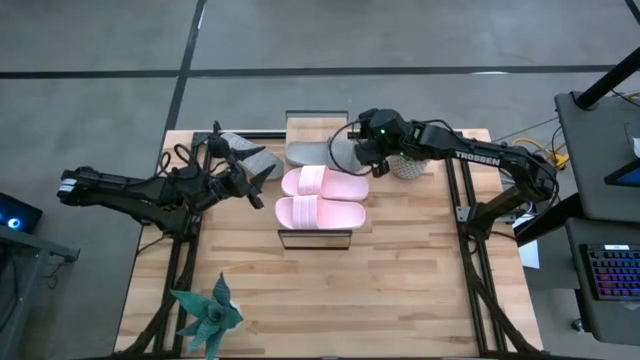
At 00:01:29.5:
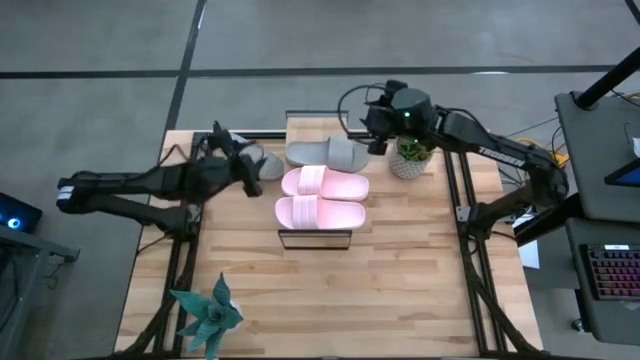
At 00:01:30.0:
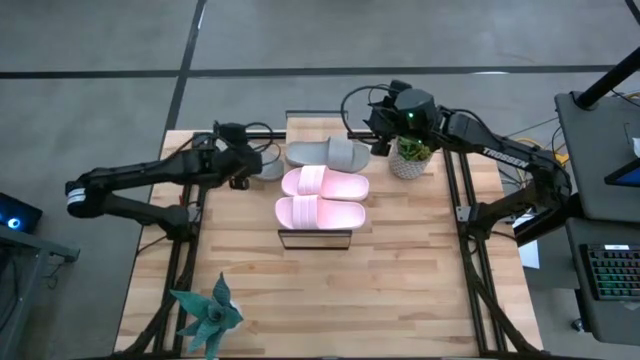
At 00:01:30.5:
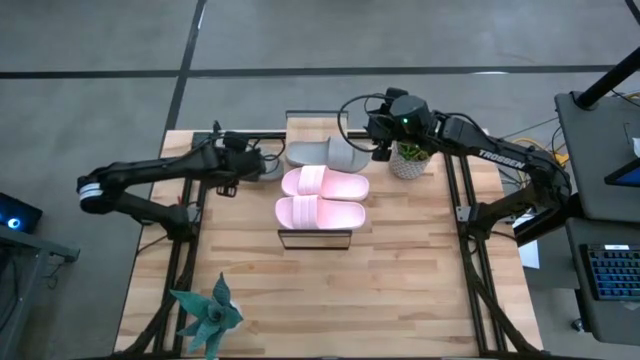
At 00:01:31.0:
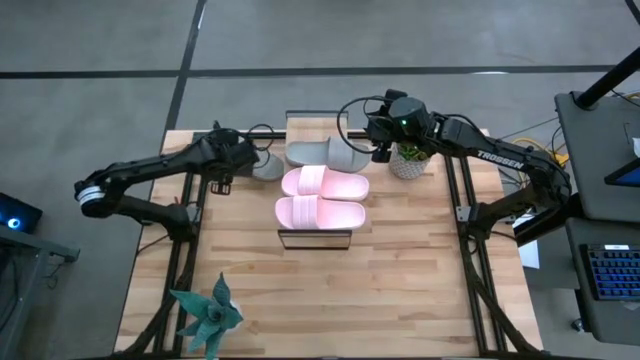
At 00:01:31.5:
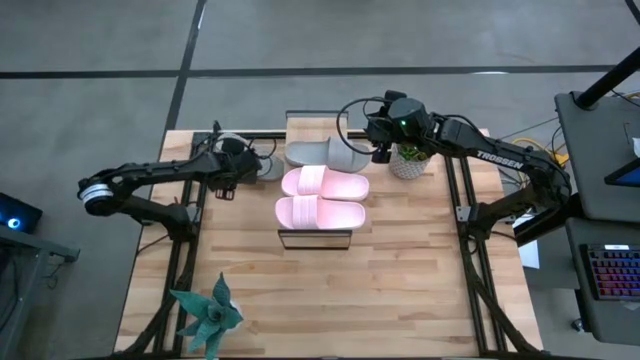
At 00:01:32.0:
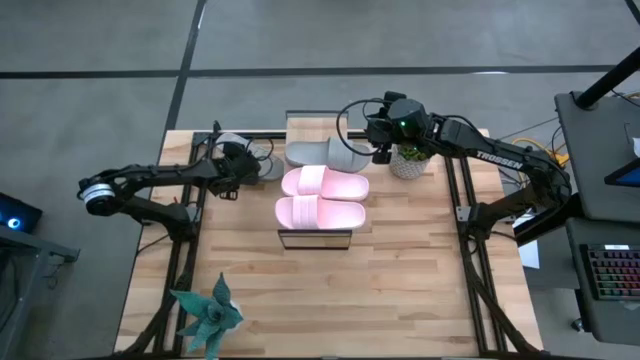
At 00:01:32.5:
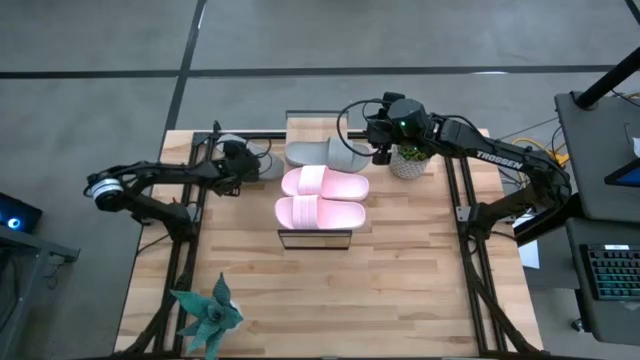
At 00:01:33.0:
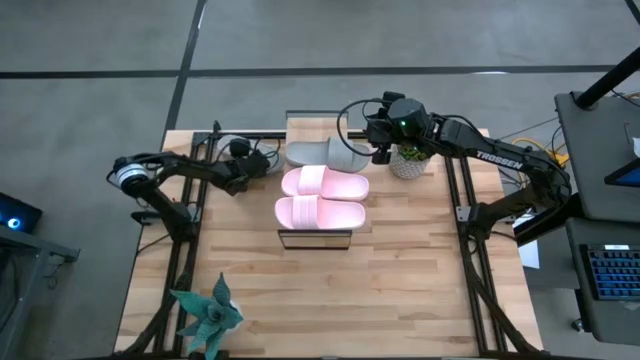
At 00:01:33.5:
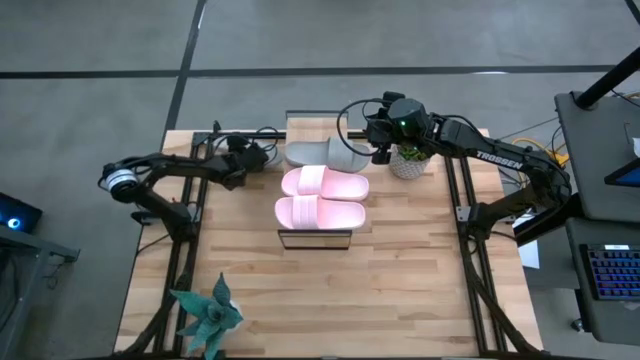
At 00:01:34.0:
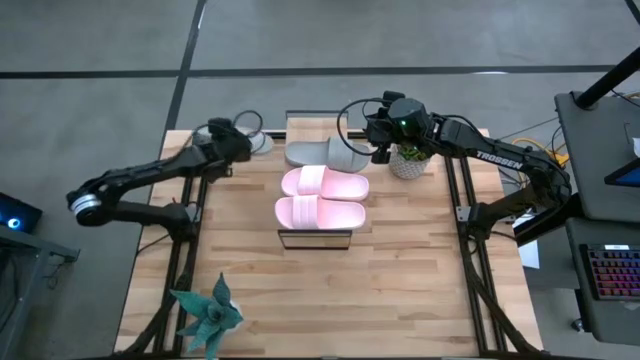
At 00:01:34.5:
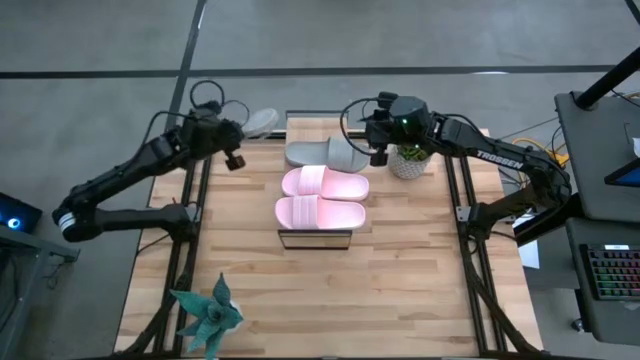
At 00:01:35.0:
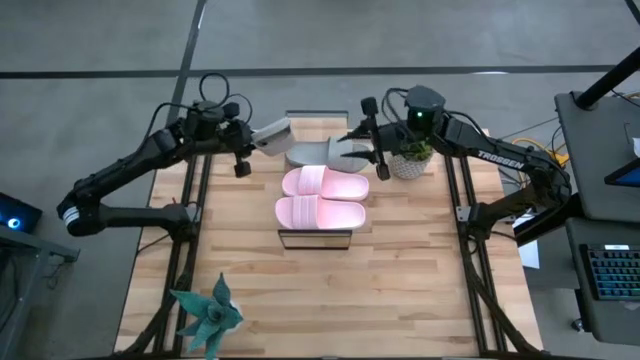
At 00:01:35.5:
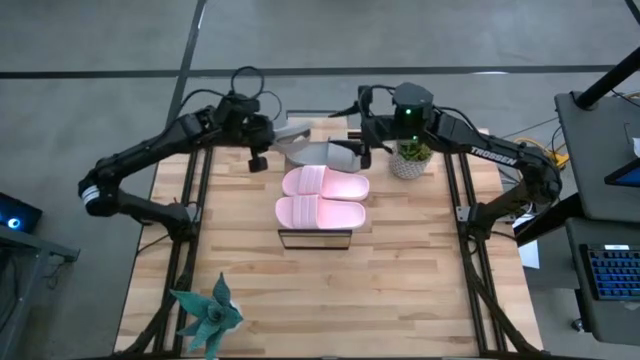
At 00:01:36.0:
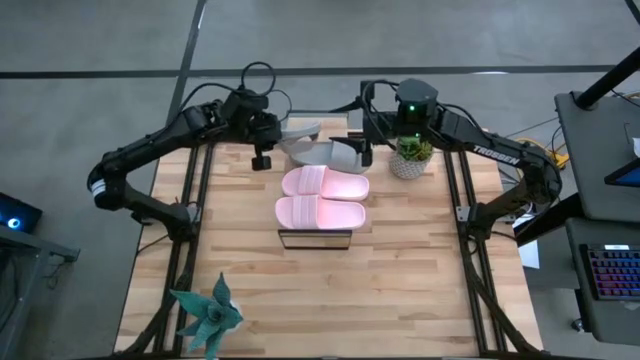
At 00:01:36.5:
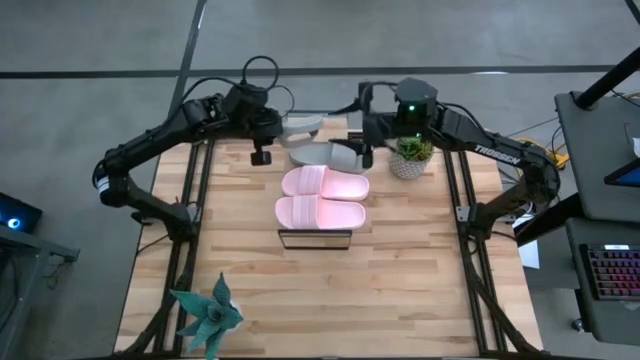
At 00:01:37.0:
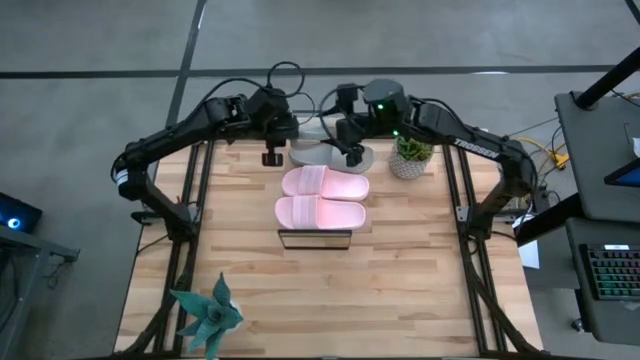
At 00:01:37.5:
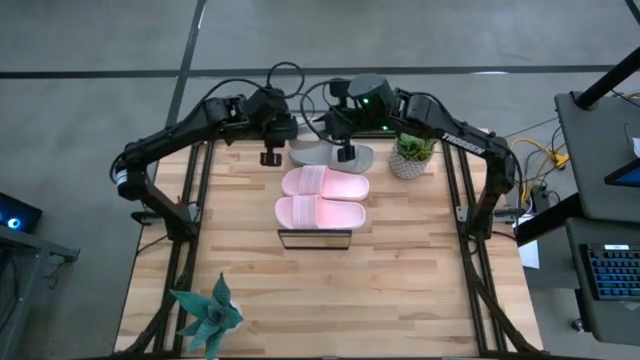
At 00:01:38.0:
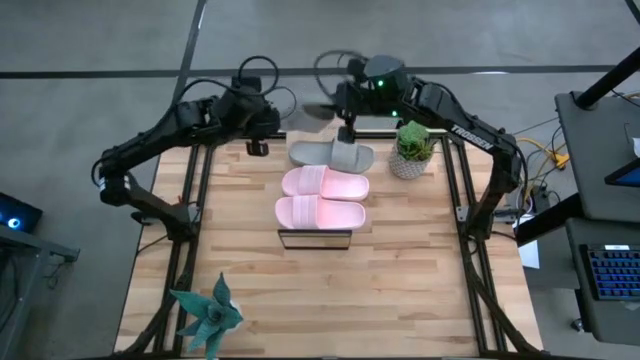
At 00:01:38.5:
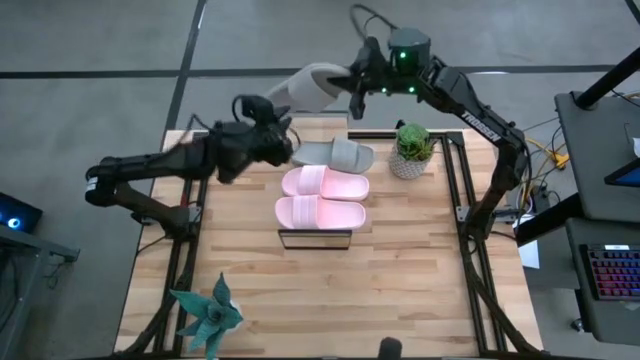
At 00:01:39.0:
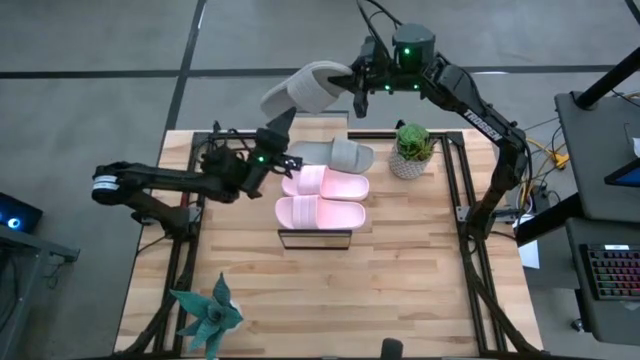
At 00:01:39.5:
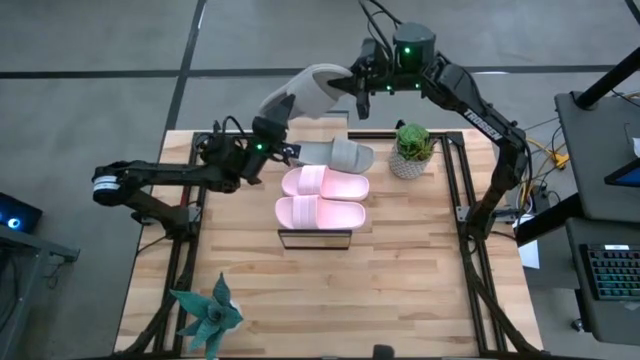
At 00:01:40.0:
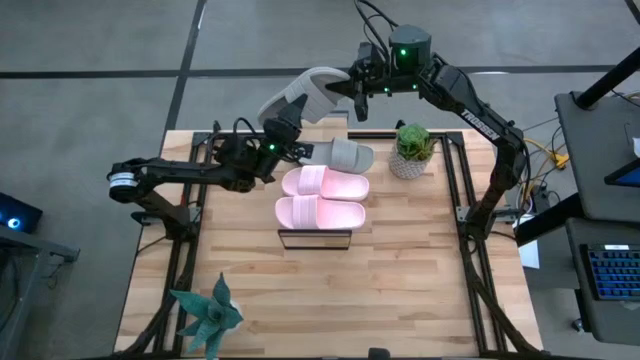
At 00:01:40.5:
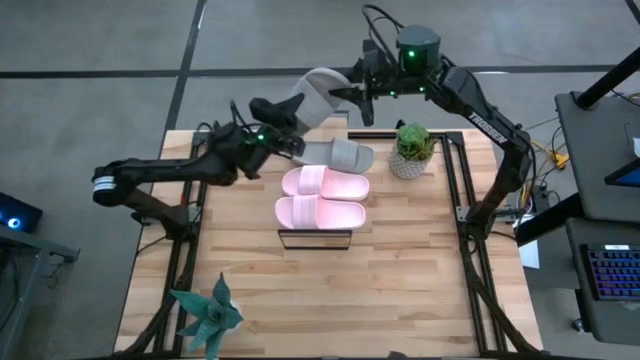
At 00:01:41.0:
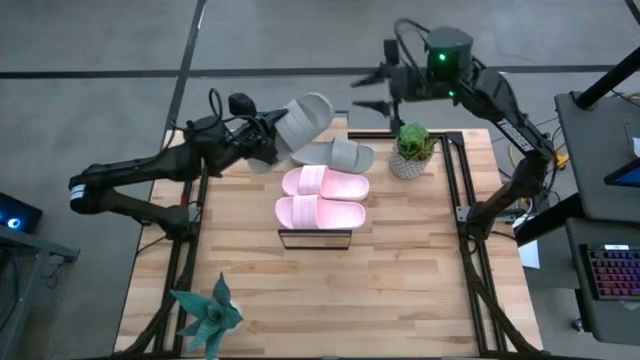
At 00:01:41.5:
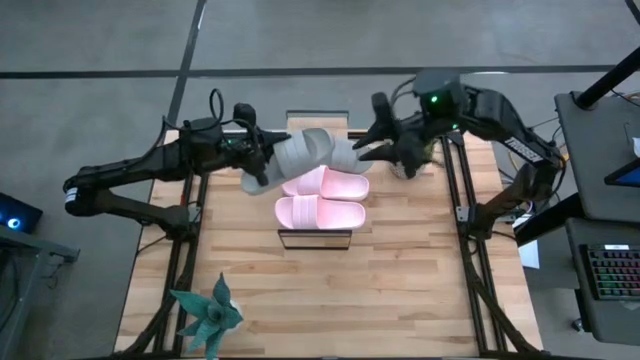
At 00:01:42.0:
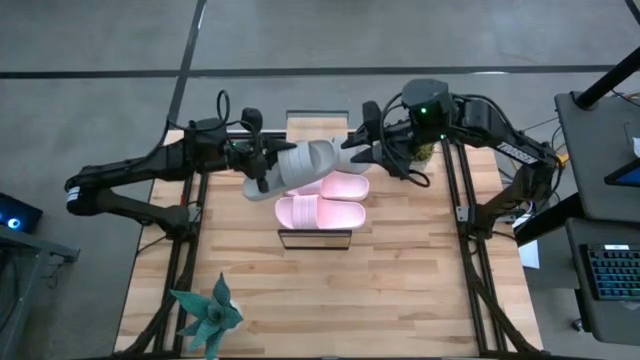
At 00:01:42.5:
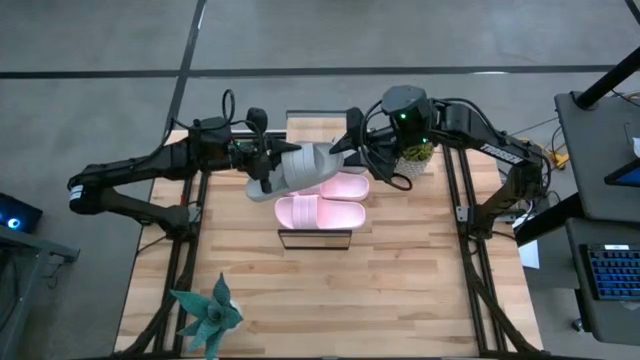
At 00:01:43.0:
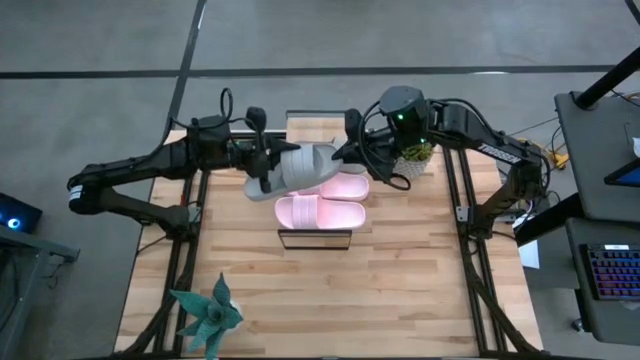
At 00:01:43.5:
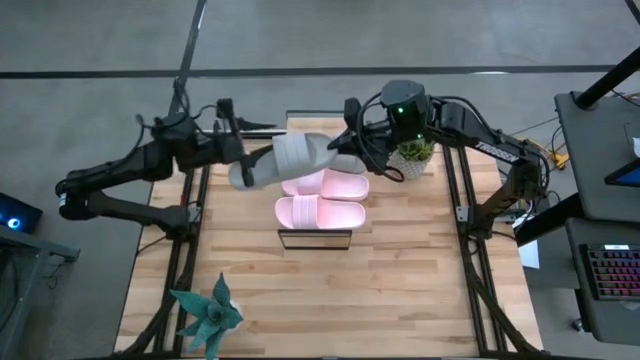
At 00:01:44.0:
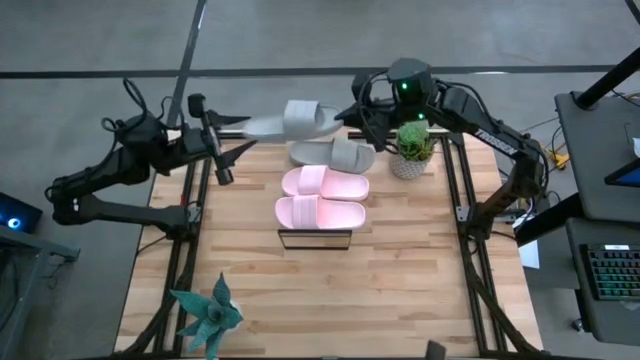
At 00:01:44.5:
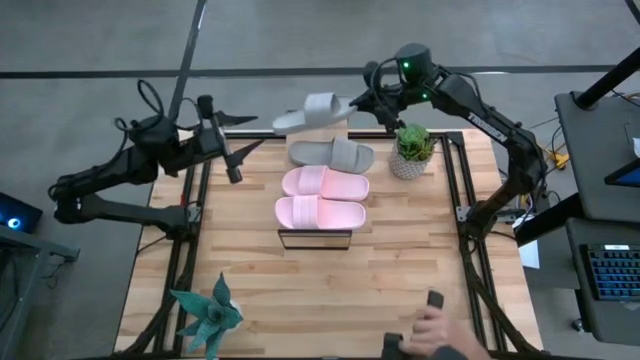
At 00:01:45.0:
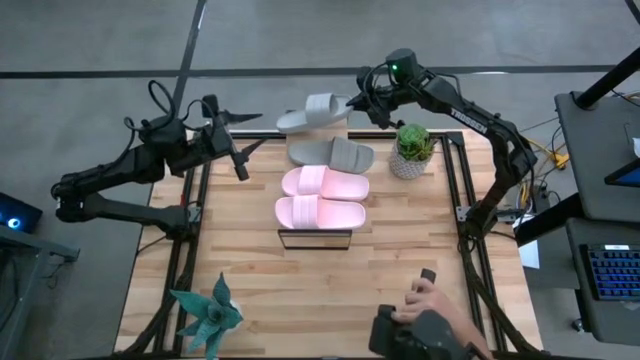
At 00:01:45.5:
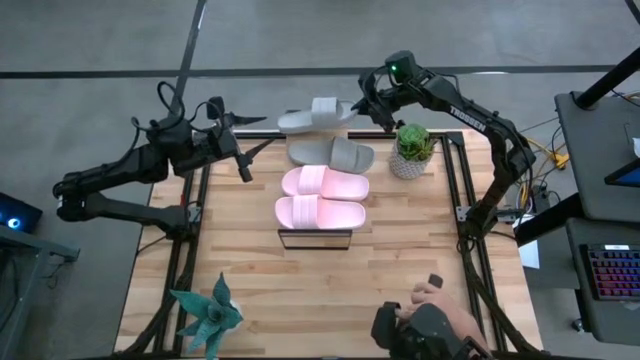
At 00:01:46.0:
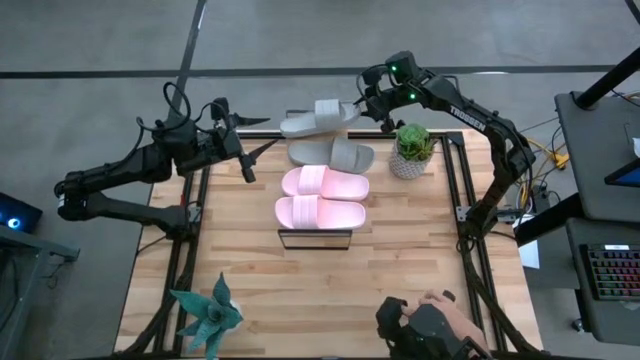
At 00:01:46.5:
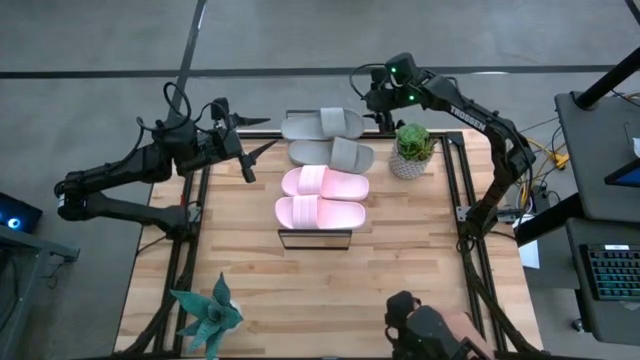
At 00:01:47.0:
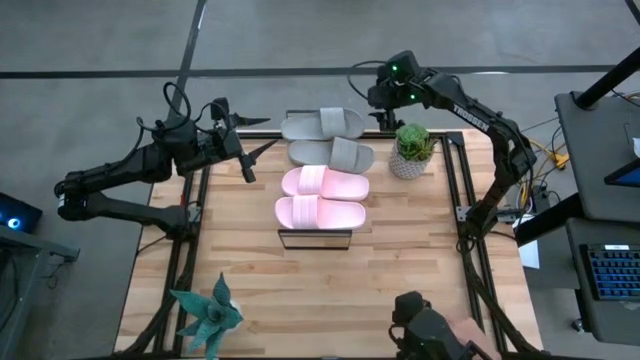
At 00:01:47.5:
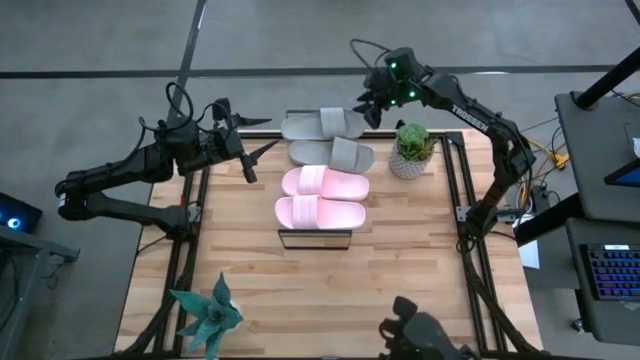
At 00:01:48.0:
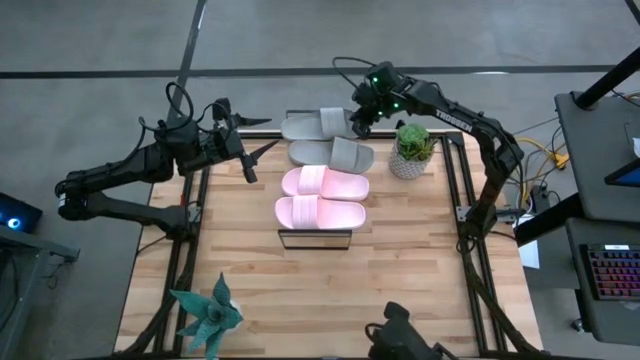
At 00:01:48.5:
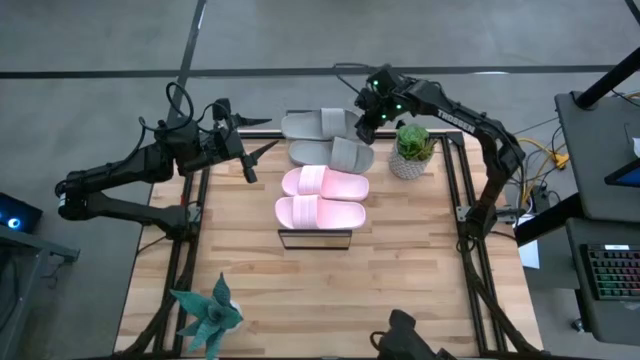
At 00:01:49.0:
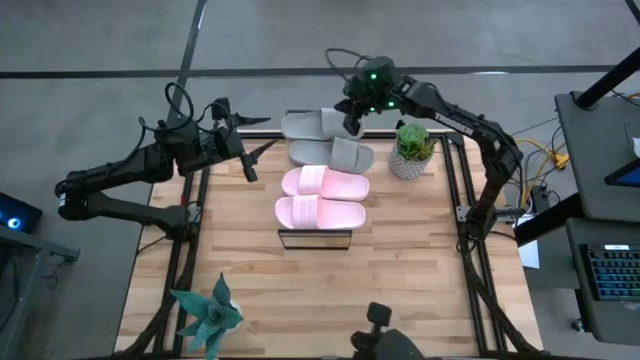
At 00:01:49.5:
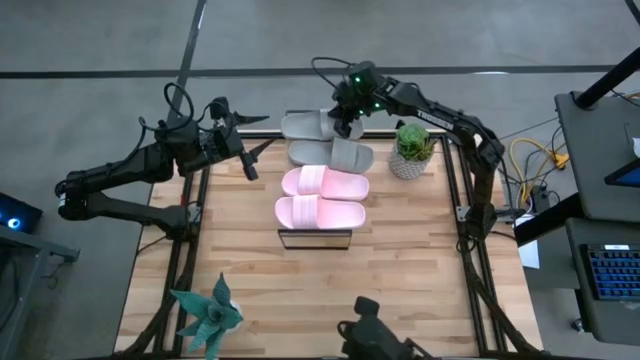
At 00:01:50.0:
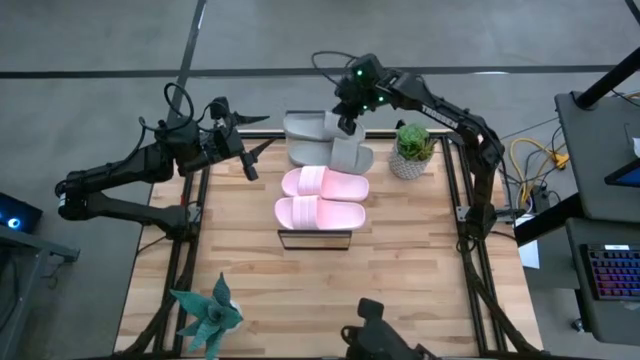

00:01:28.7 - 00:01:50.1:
Task: Pick and place slides into the shelf
Put the gray slipper on the shelf
